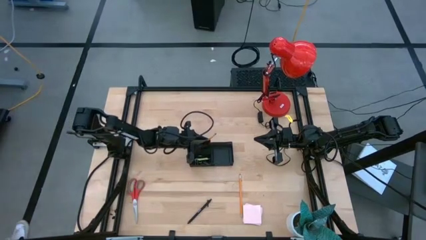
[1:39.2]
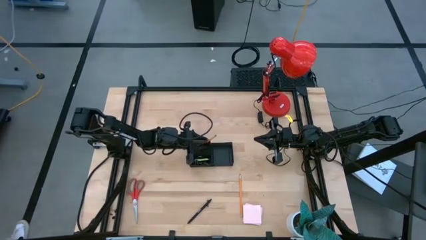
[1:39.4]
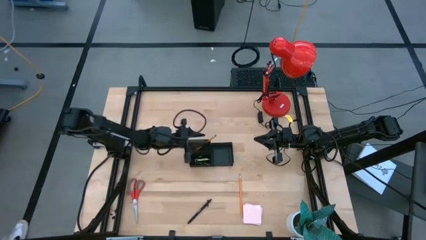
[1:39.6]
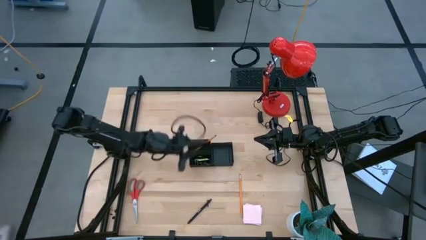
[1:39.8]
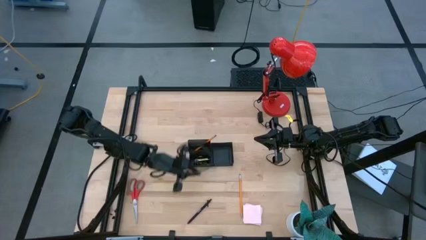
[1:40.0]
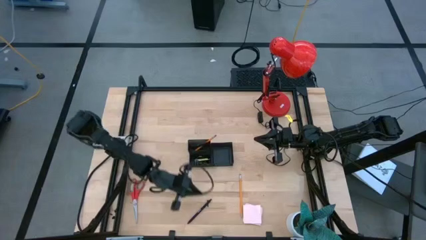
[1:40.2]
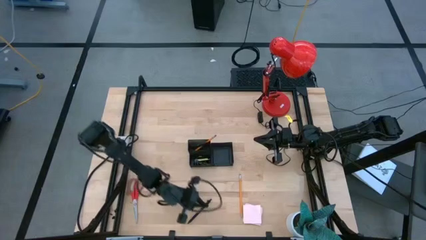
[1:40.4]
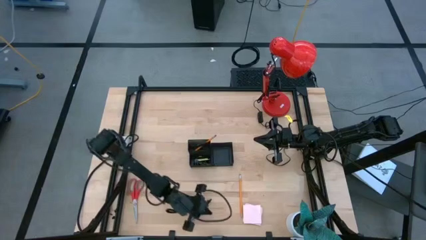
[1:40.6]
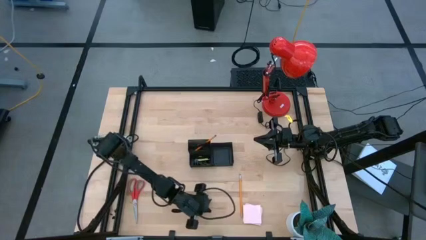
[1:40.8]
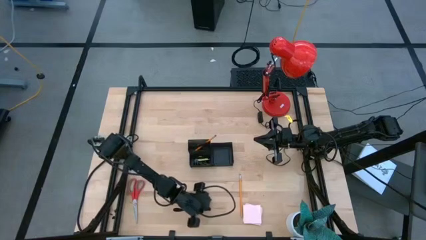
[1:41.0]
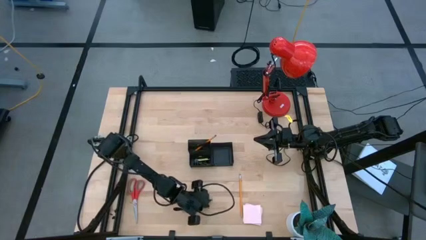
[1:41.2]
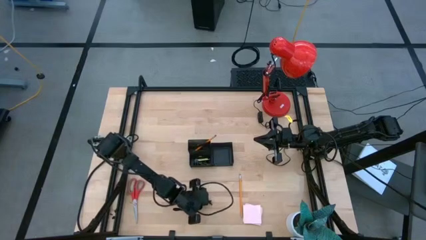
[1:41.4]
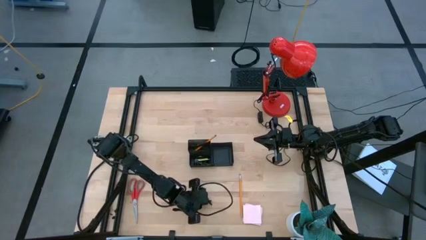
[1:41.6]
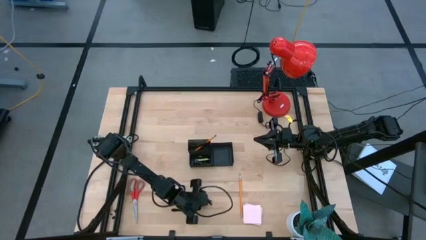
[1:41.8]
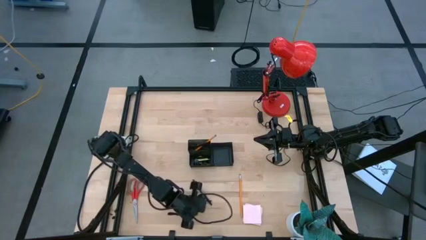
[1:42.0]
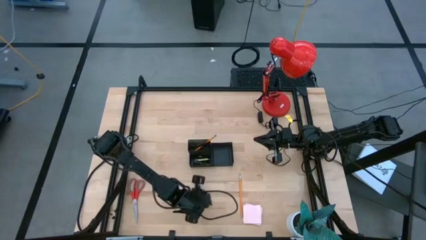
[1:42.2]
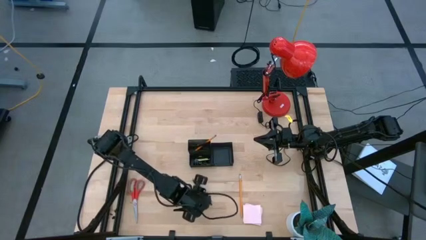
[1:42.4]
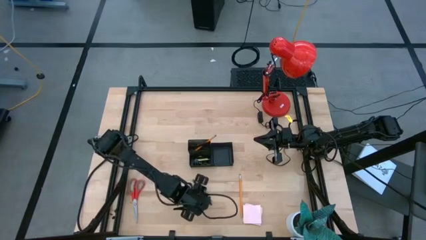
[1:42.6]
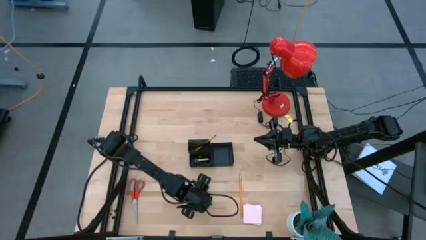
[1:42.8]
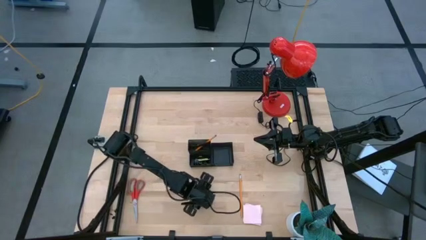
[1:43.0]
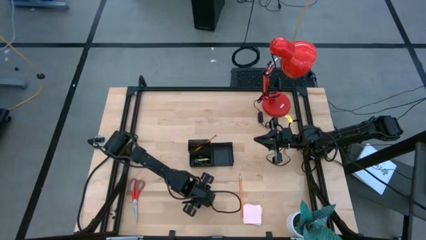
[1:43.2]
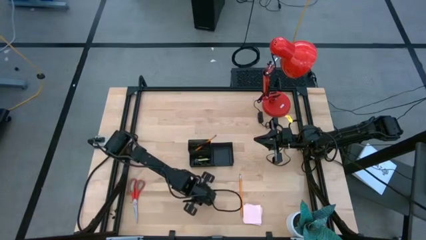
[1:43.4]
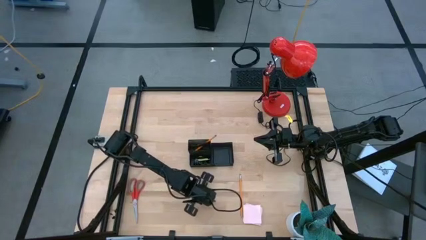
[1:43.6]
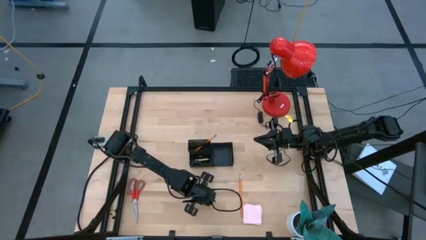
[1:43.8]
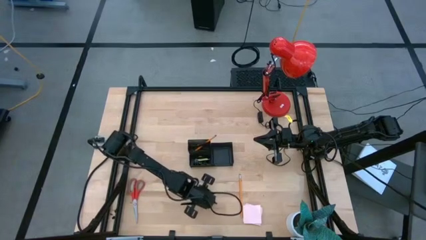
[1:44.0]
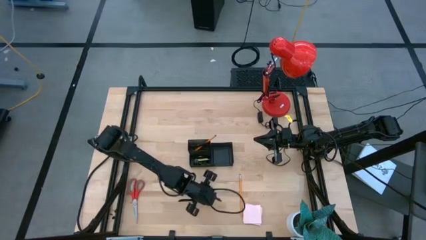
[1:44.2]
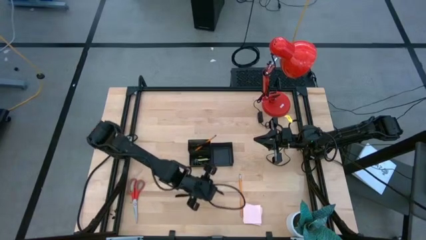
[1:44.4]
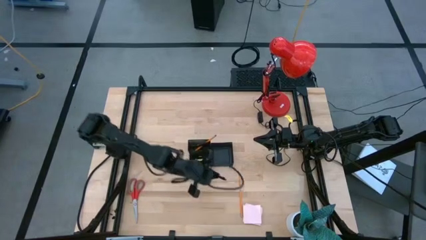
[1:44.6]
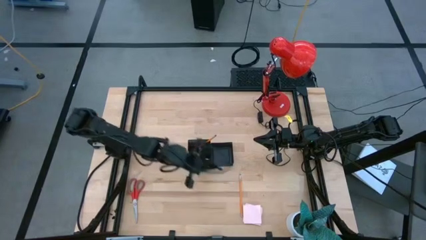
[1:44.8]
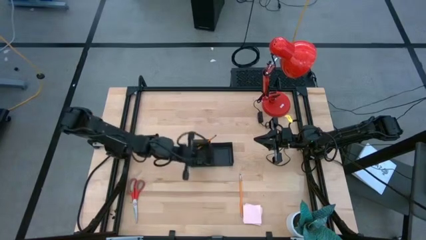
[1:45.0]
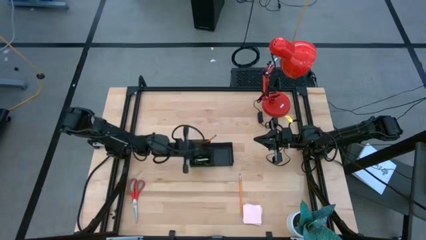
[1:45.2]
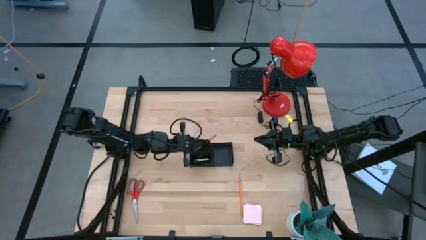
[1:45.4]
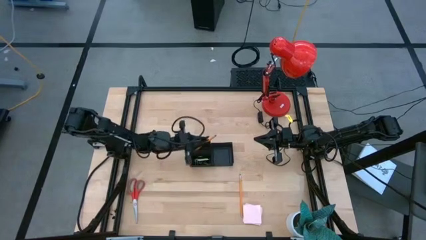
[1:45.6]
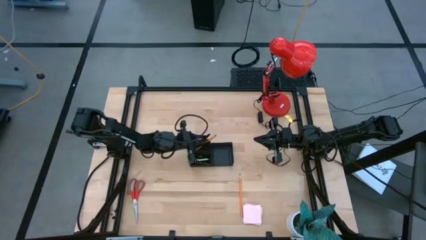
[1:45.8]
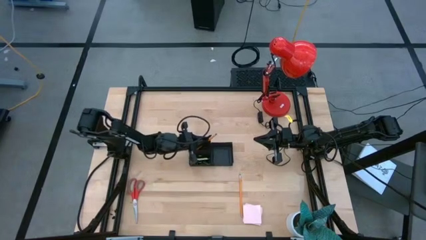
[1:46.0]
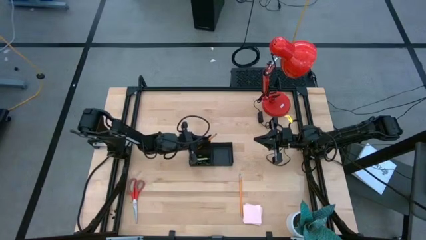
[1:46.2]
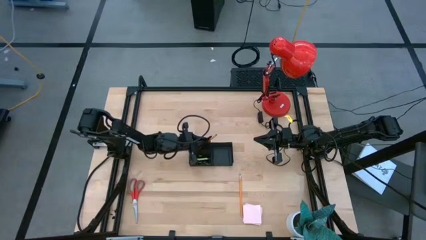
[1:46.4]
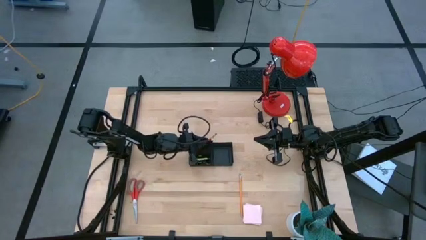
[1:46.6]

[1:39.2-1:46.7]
Task: Pick and place office supplies into organizer
Put the black pen into the mesh desk organizer

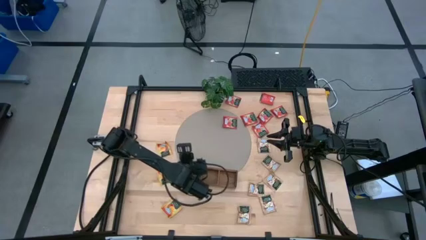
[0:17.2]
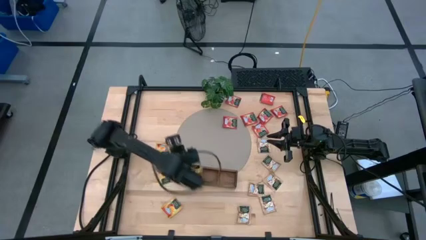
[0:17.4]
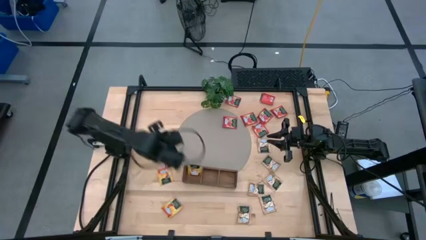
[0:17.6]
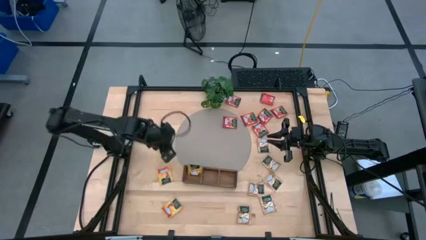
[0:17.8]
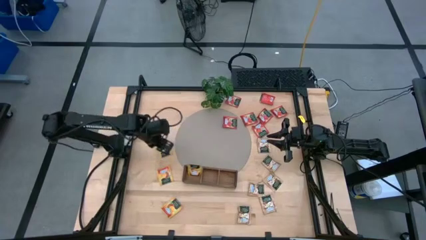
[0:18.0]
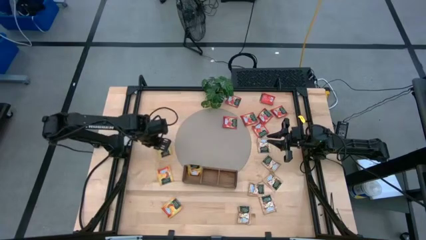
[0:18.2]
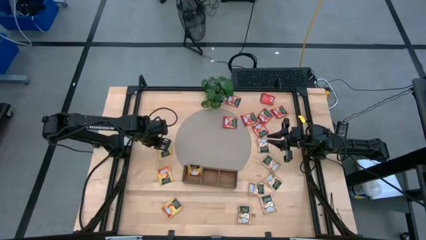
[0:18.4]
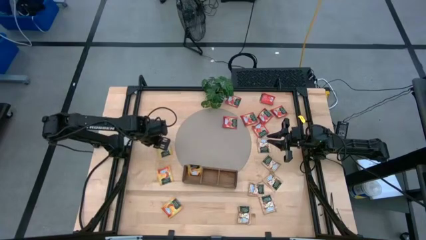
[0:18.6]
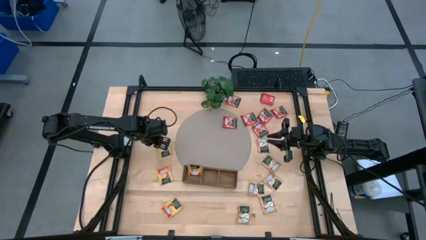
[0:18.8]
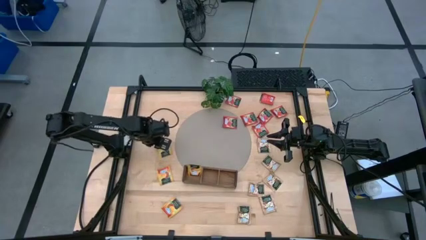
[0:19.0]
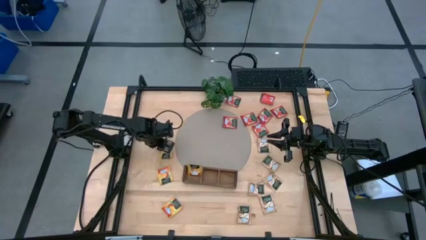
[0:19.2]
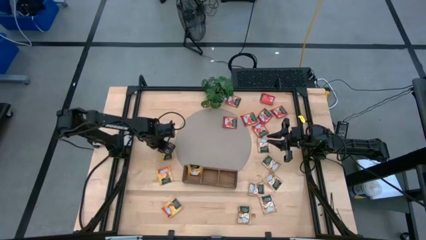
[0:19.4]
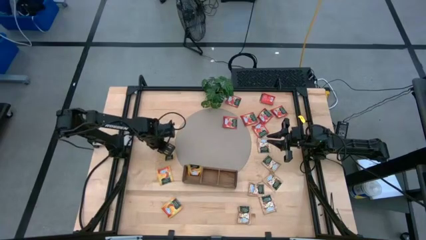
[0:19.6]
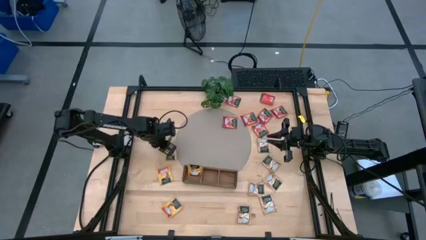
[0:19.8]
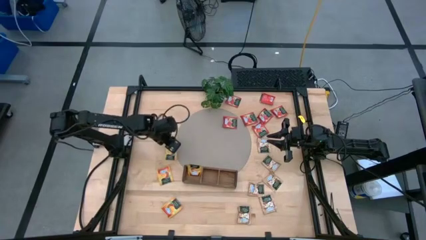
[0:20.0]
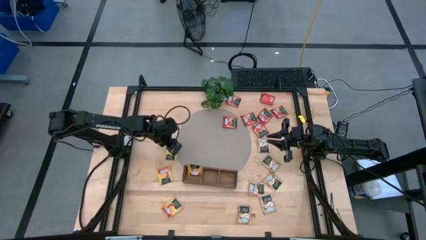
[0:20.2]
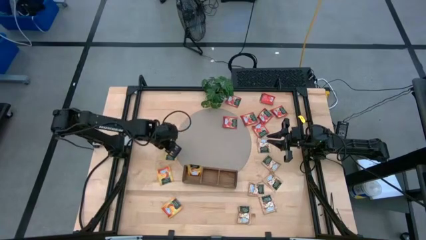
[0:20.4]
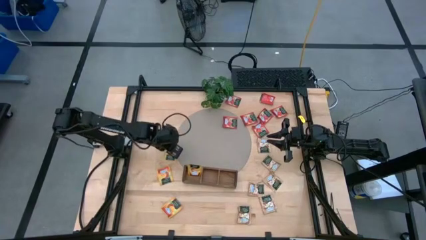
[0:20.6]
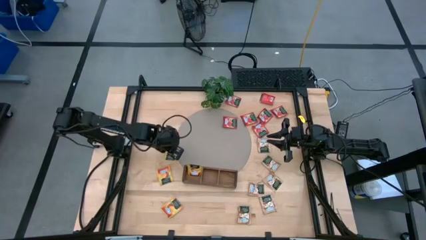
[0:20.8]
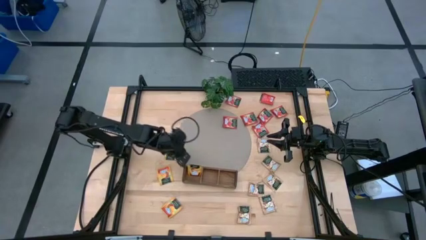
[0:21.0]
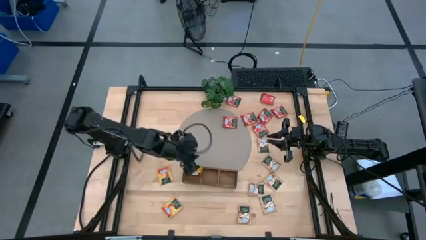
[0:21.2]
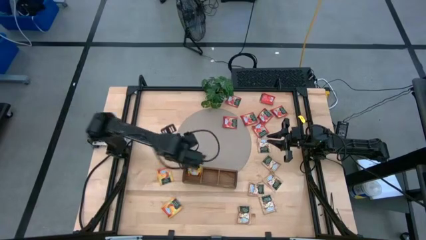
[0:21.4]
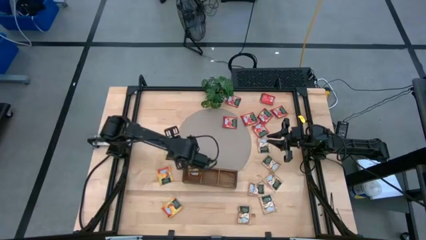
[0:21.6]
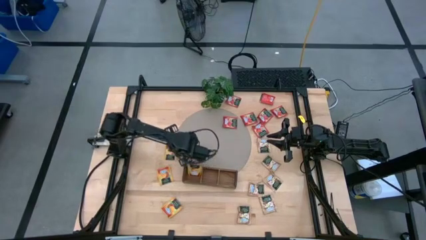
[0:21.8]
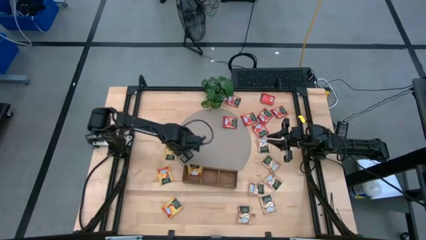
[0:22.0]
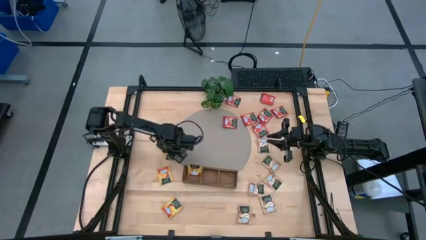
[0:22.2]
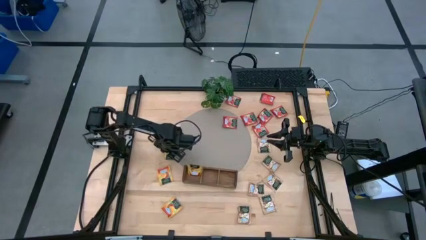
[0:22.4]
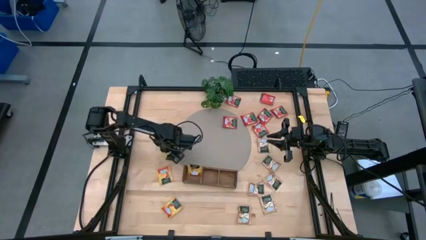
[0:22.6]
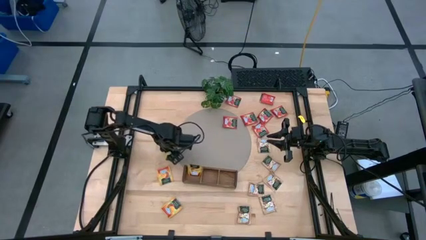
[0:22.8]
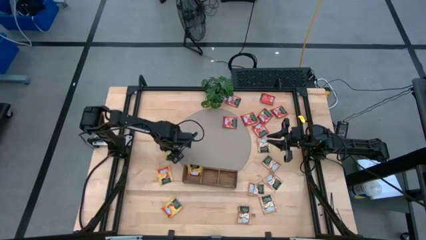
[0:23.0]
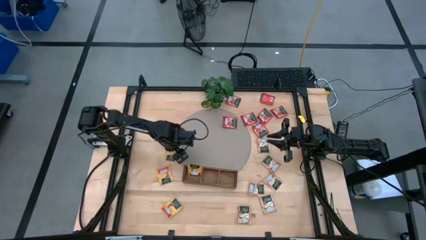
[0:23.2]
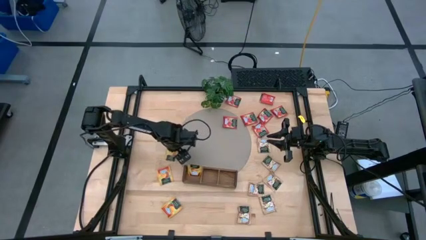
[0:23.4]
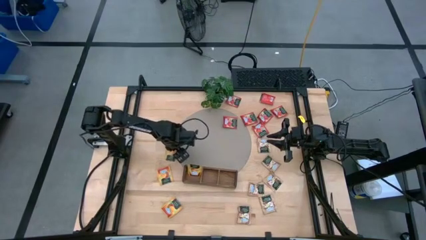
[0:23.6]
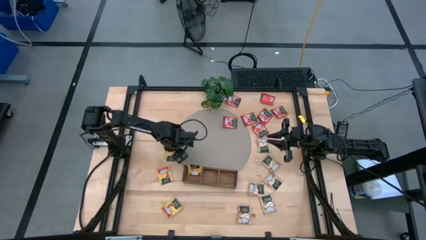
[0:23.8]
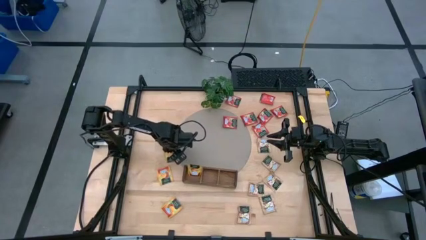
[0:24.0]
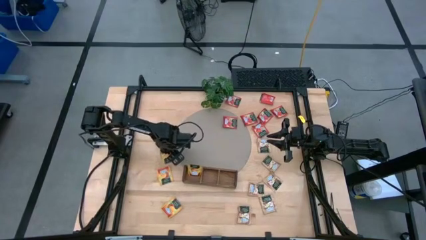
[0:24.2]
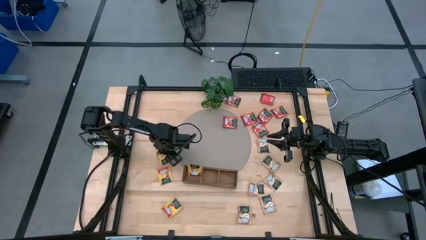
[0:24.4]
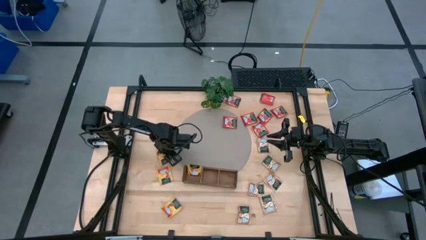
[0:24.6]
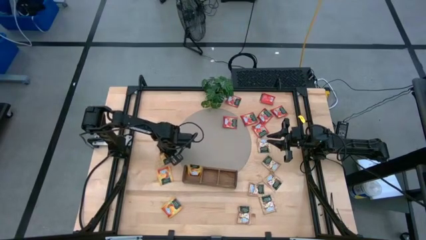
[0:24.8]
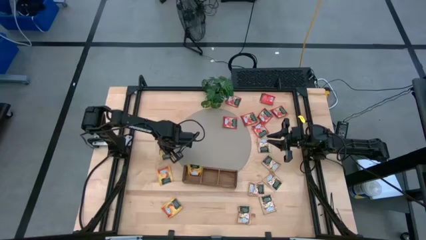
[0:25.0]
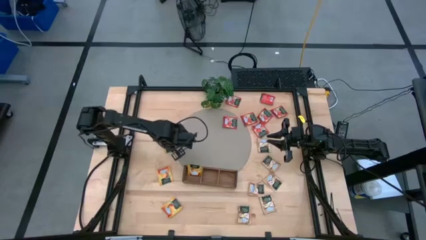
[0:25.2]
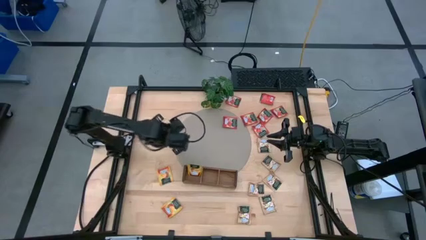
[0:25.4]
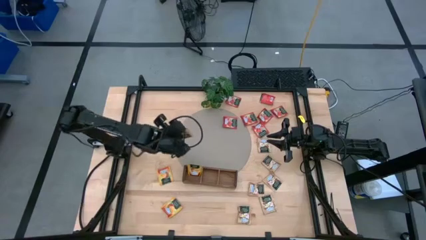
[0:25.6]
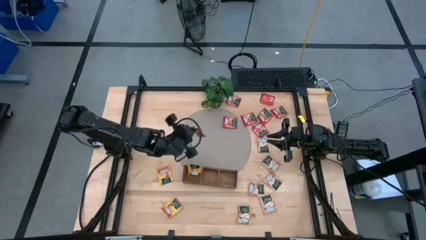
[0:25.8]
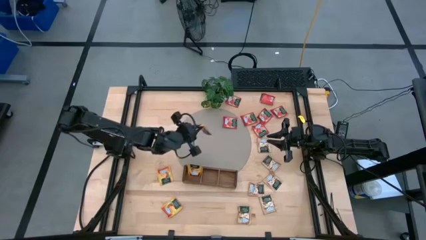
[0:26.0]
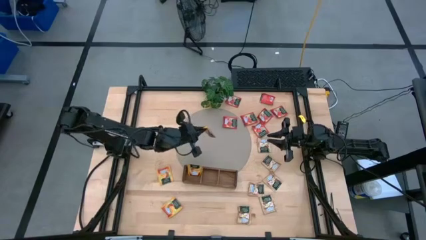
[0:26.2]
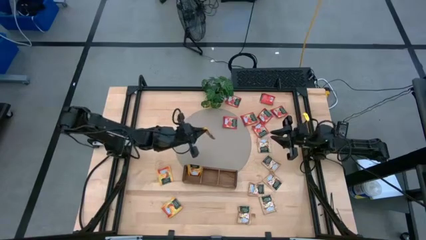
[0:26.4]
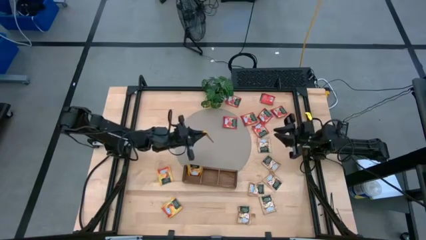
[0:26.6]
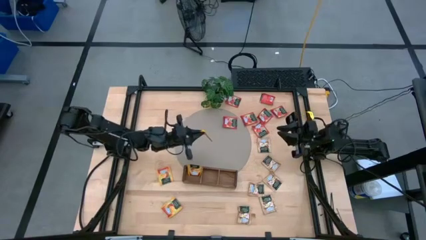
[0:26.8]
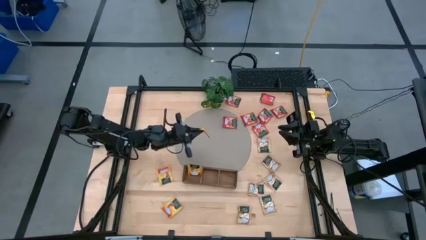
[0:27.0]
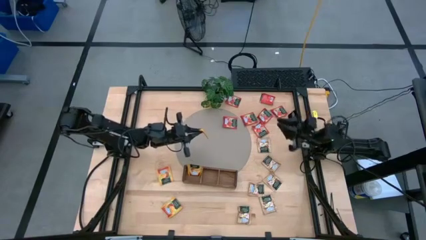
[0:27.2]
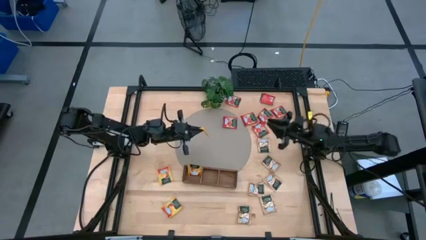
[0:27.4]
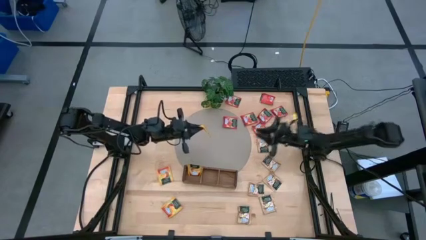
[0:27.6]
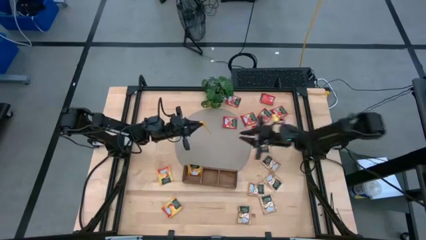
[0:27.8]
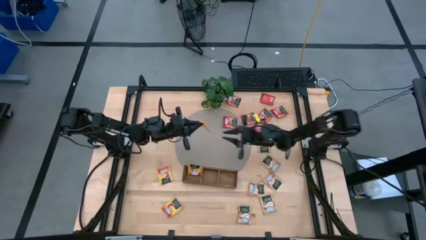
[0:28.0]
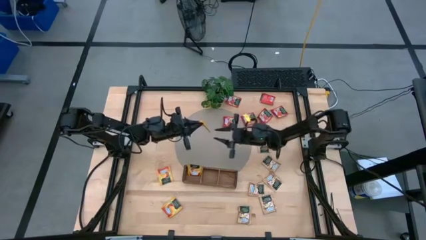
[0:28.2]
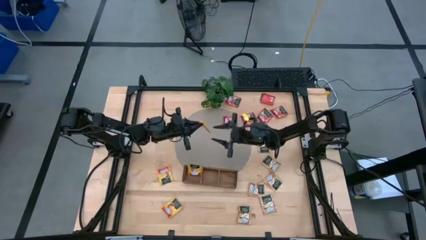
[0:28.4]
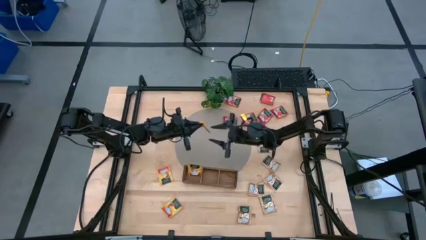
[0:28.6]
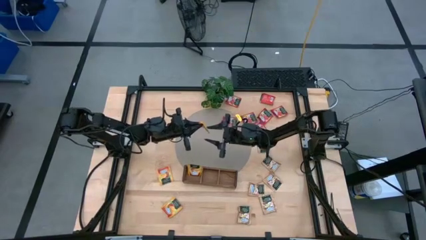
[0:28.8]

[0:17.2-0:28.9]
Task: Pick & Place Tea
Put the top orange tea bag into the left slot of the wooden organizer
